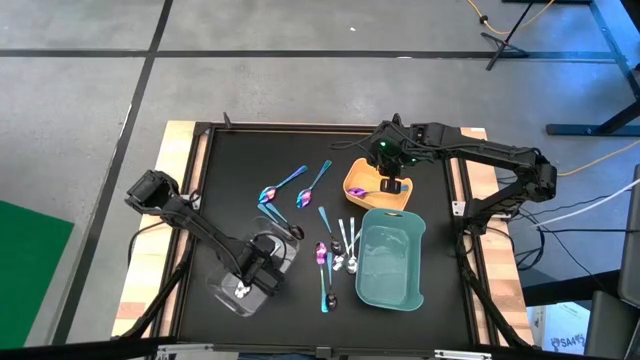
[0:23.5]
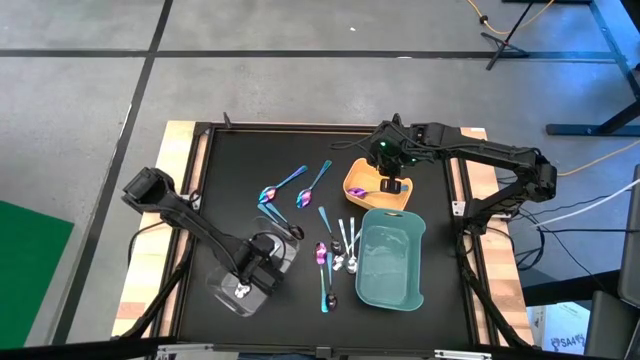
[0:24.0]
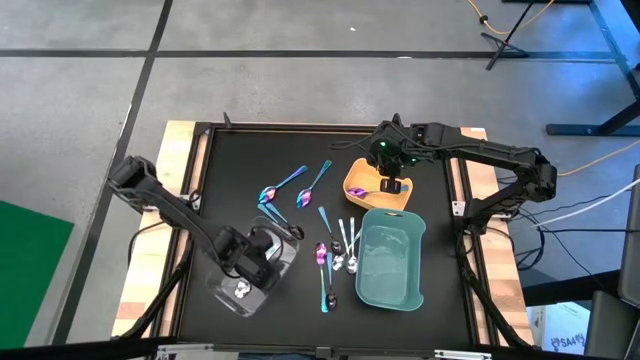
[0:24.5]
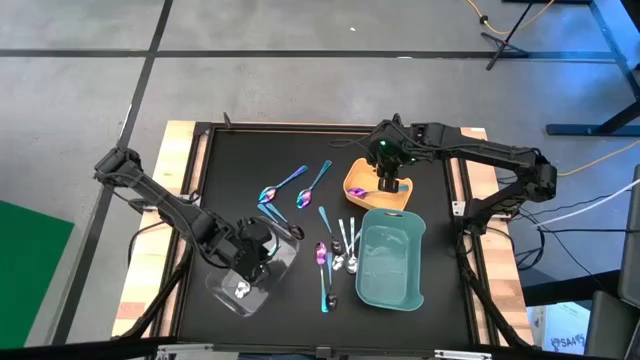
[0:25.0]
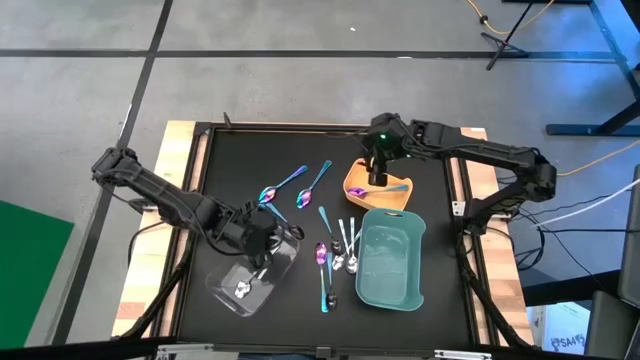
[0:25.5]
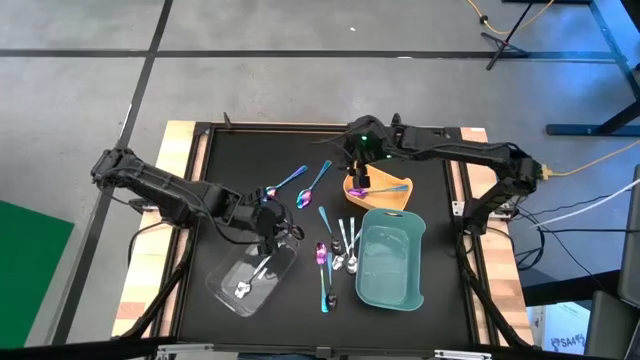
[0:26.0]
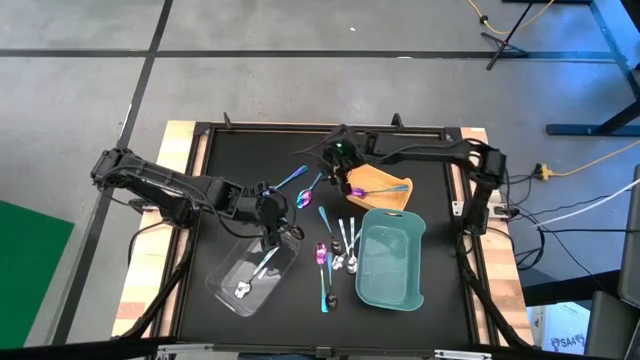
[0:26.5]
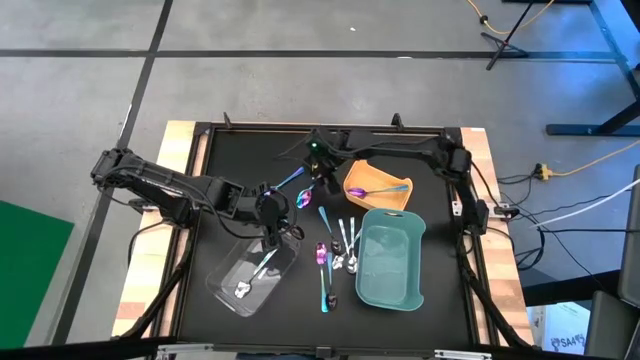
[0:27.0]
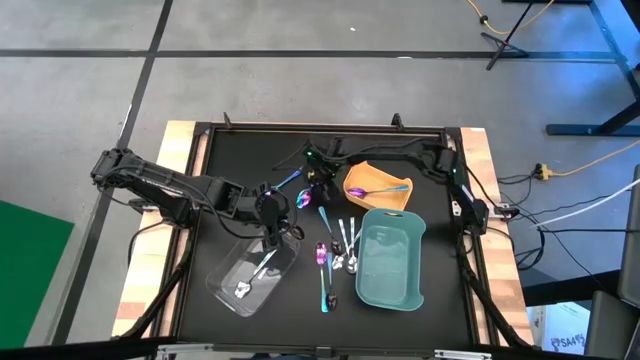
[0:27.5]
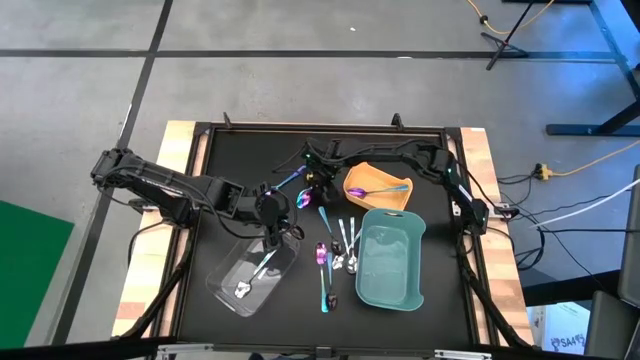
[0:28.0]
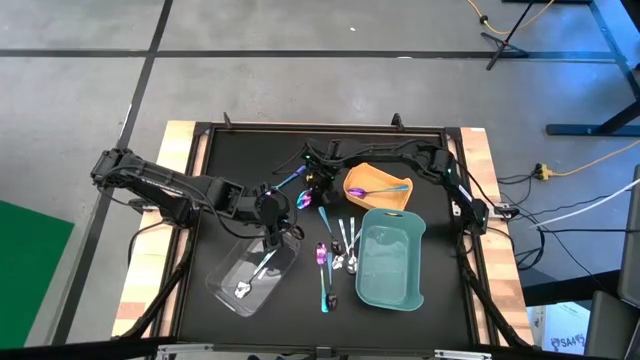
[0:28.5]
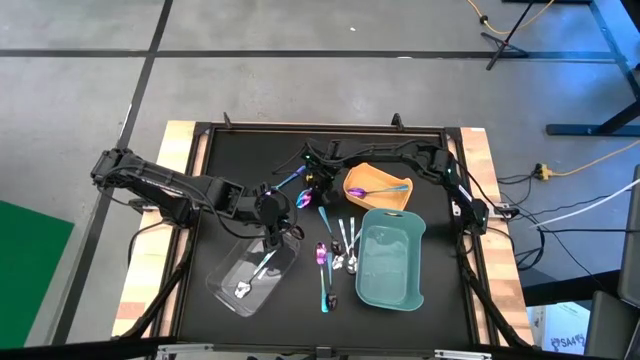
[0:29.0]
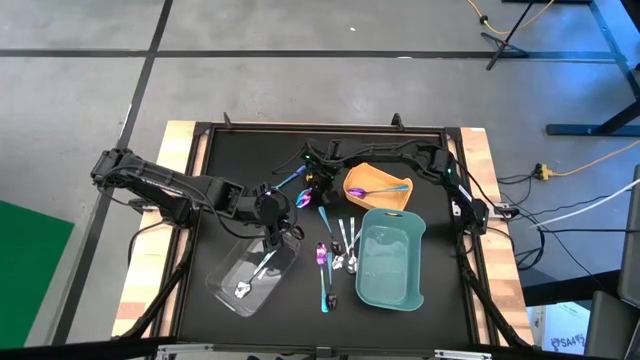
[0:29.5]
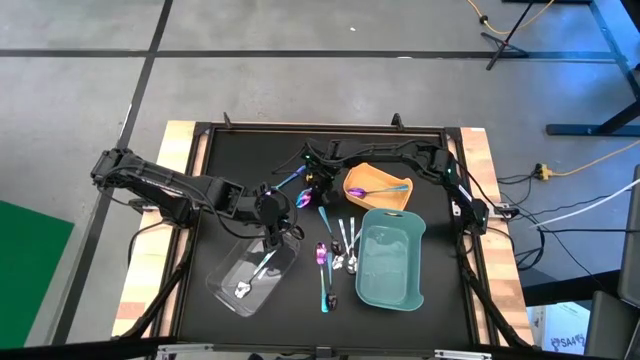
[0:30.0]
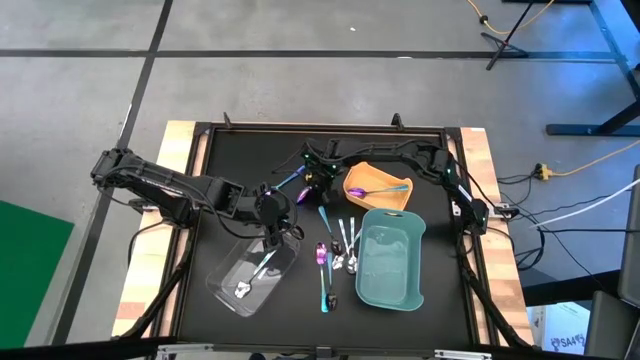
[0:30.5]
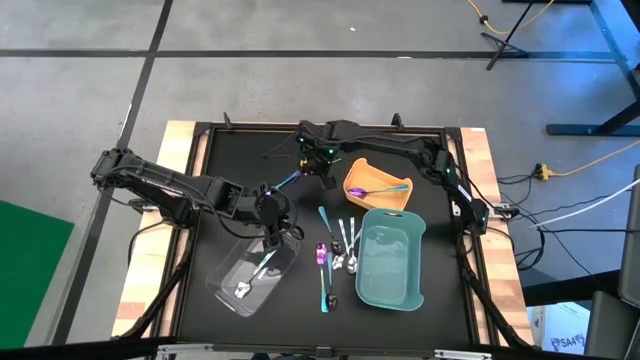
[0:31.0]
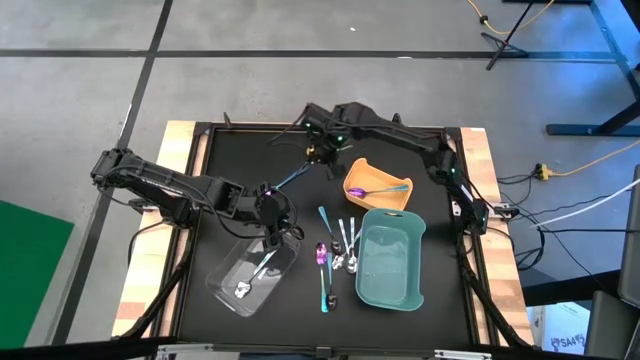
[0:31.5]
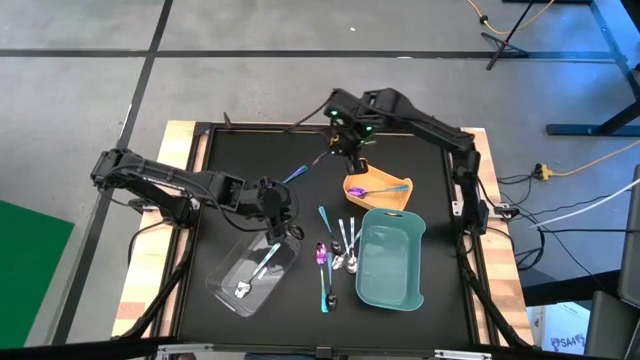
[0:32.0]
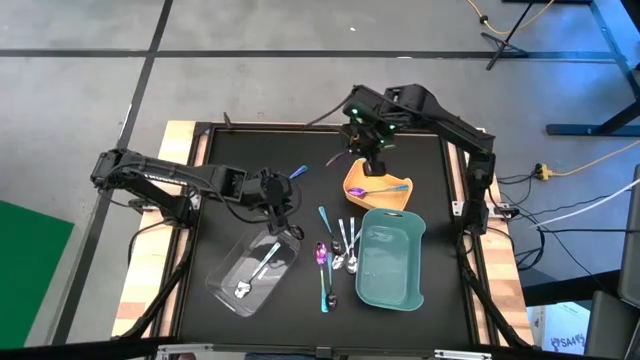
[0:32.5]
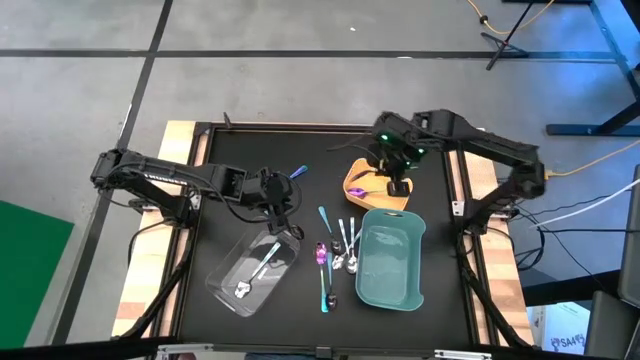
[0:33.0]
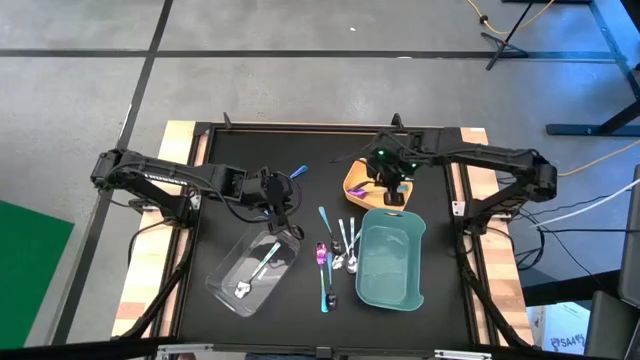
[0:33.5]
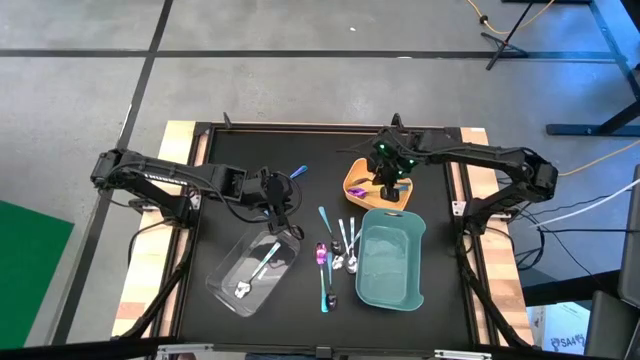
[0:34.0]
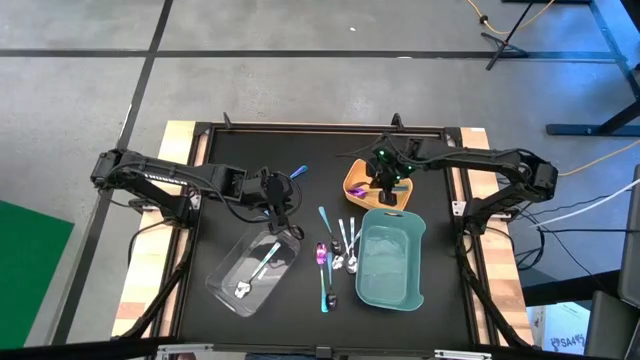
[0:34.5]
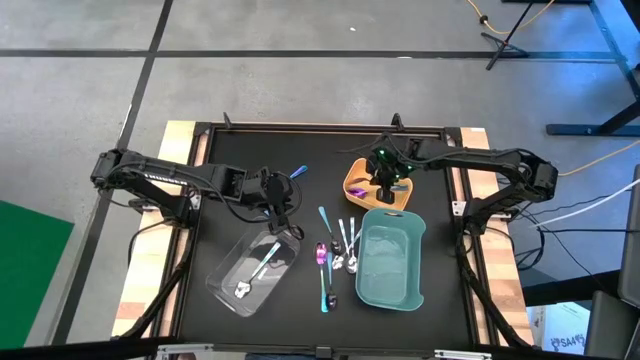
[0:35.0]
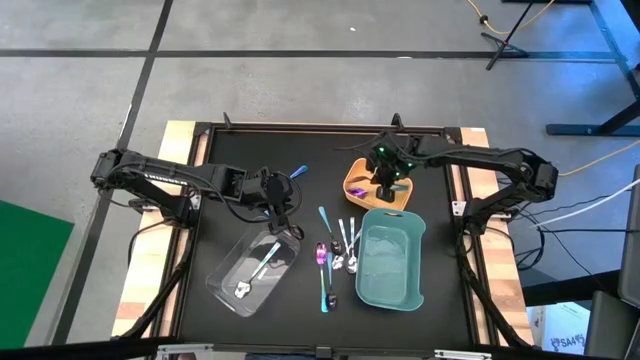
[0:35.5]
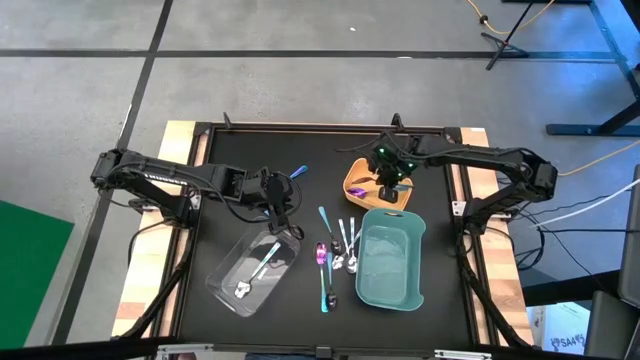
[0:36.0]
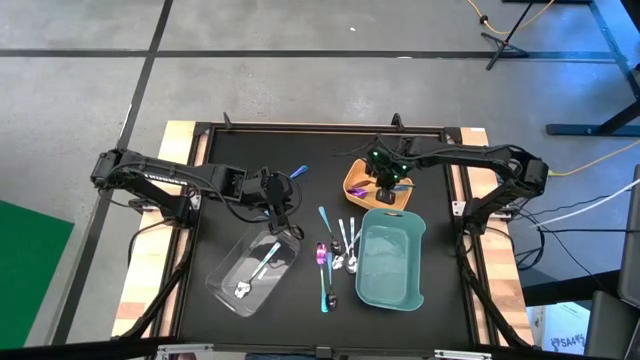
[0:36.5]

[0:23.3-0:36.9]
Task: Sort silverware by color (type)
Put the violet spoon into the yellow bin

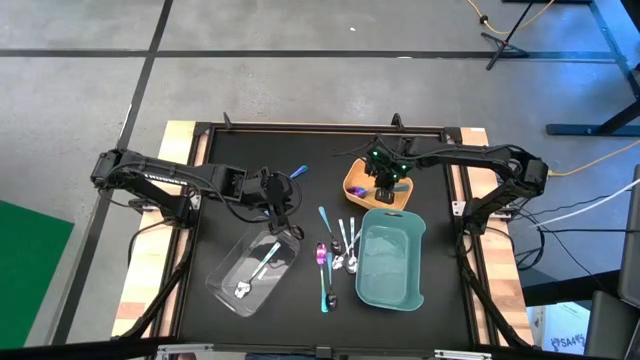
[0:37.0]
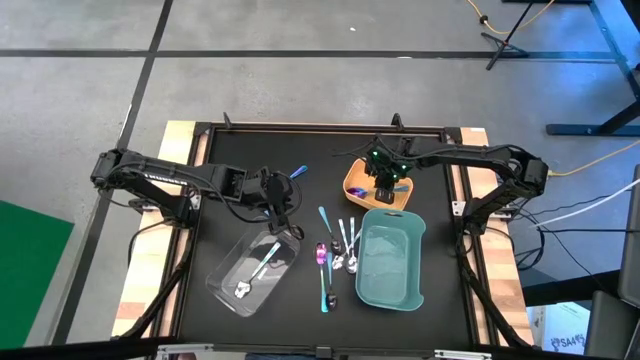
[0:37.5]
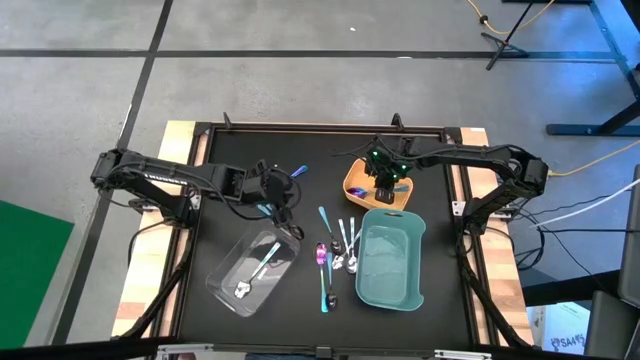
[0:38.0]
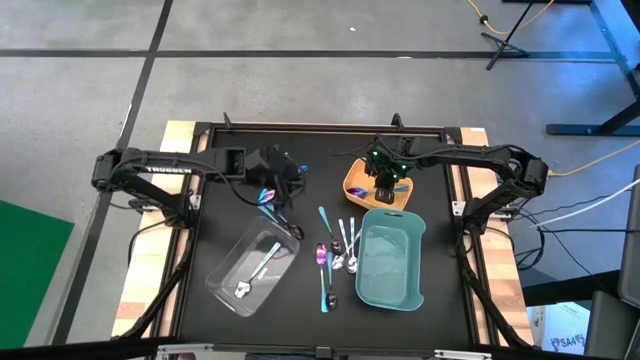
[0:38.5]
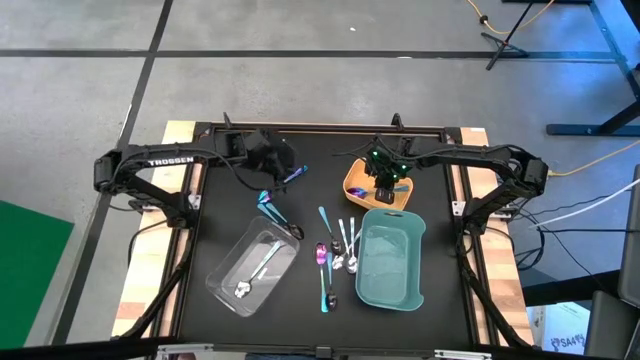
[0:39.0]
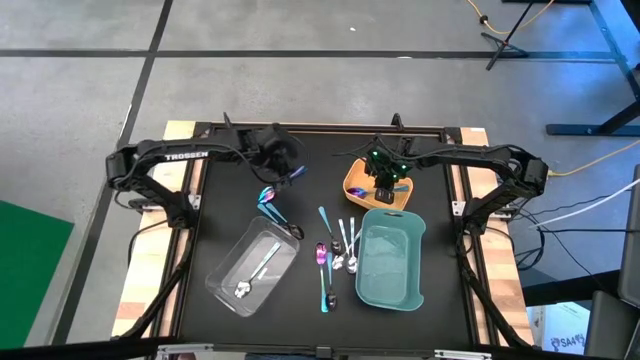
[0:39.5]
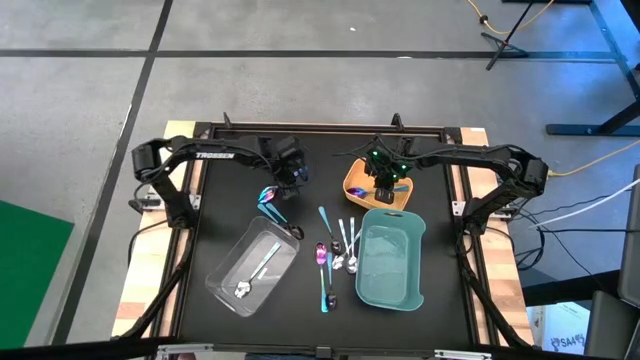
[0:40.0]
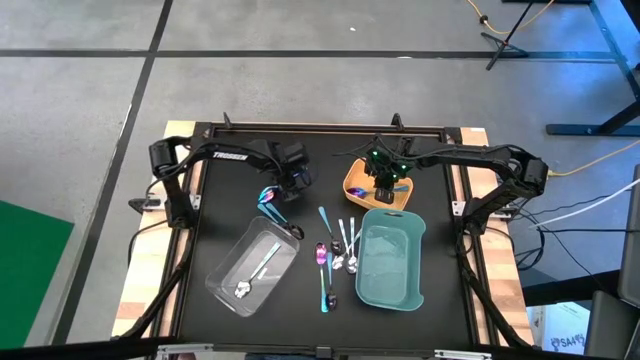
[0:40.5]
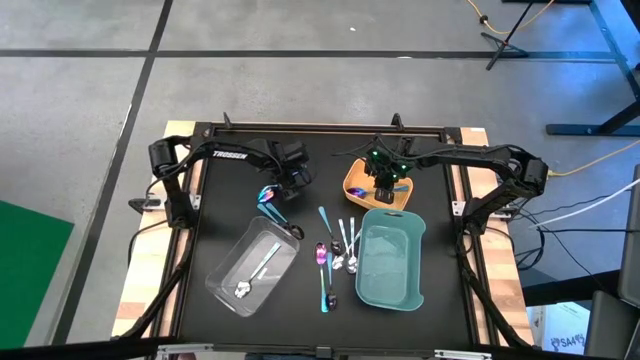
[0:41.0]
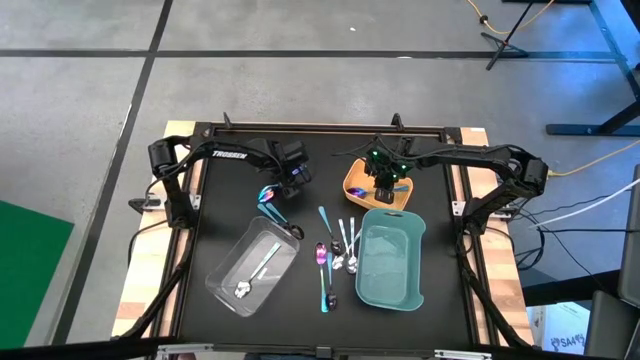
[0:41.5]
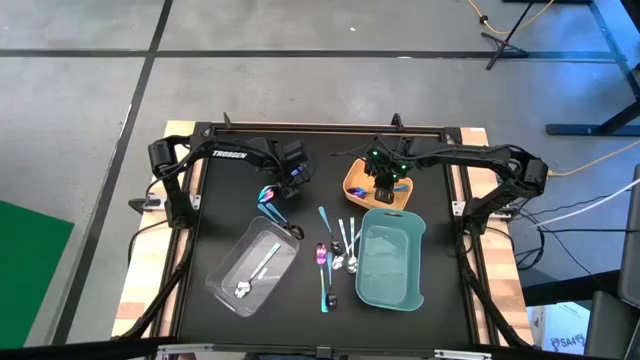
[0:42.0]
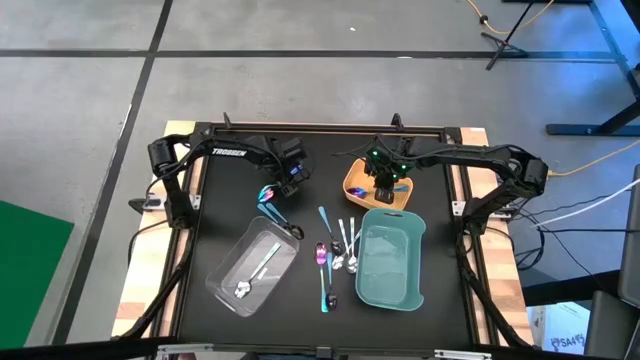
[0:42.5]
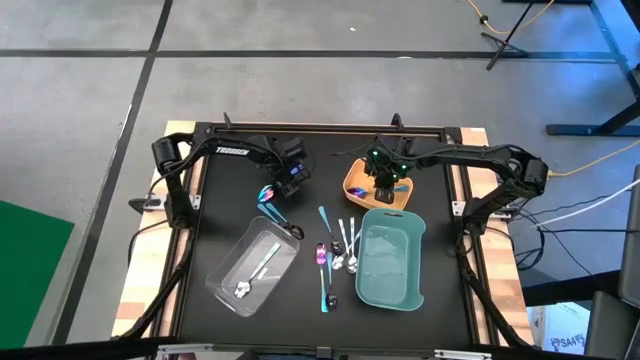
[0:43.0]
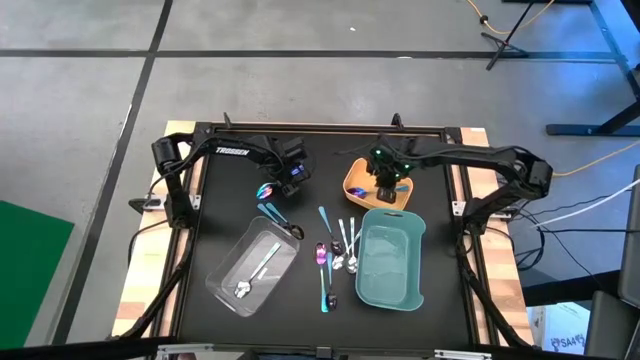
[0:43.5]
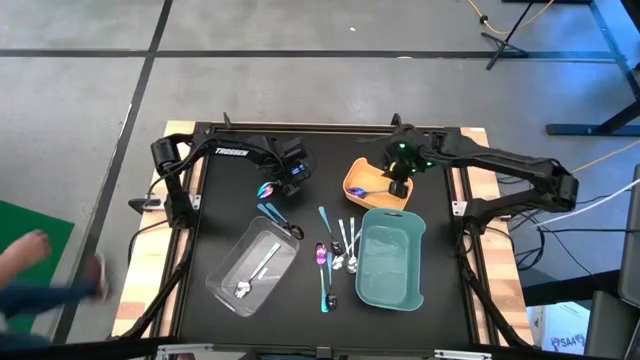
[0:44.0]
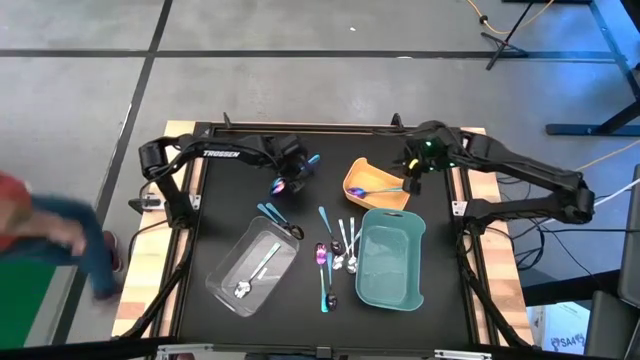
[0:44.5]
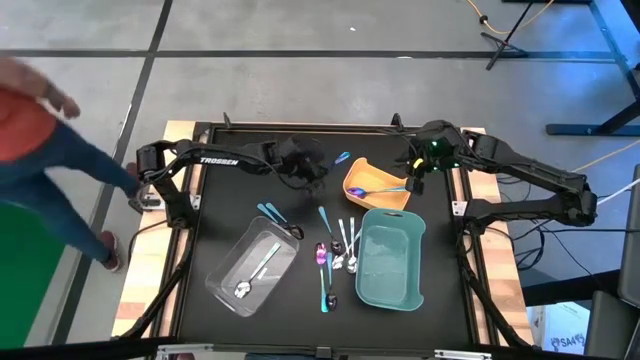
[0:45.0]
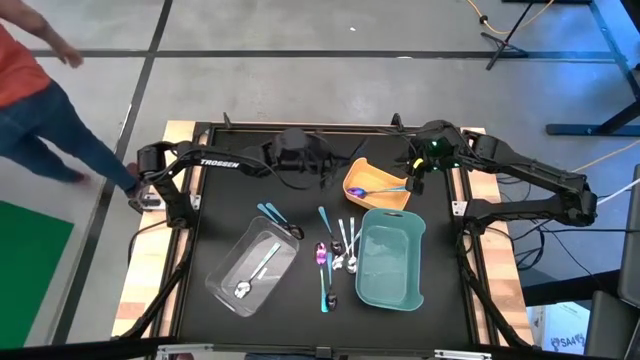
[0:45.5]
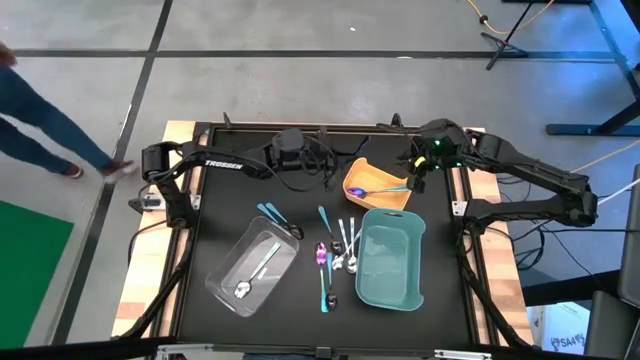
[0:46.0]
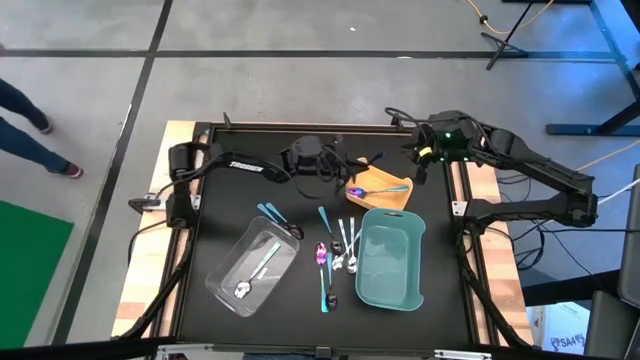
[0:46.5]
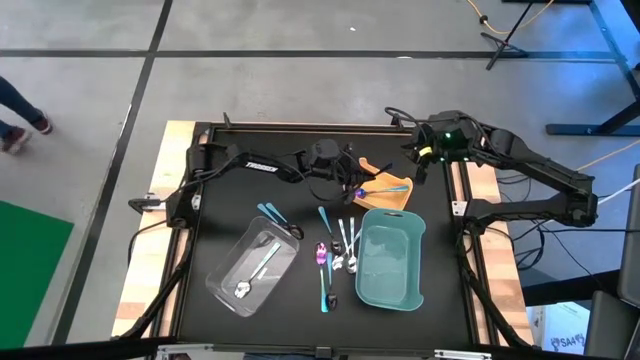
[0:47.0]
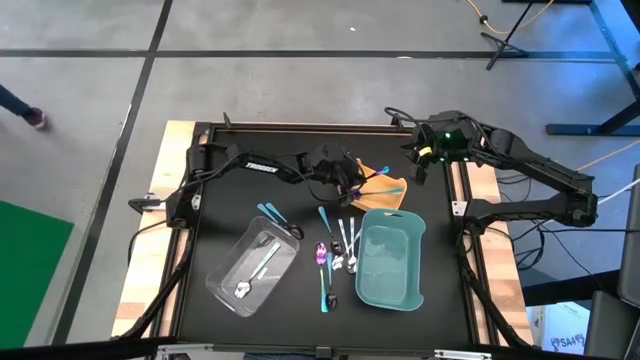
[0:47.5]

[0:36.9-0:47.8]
Put the violet spoon into the yellow bin
